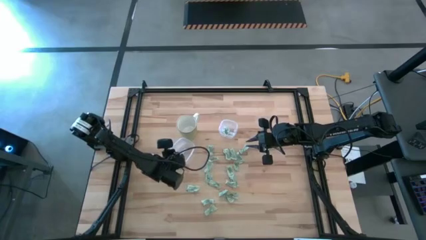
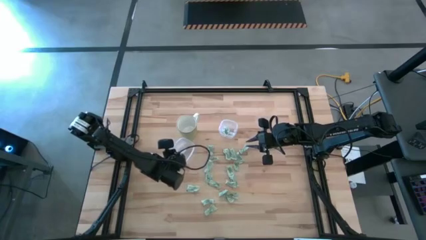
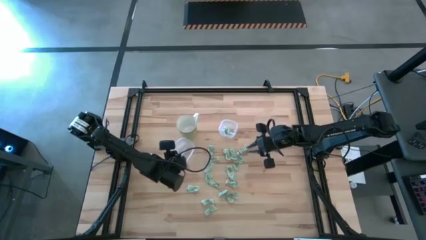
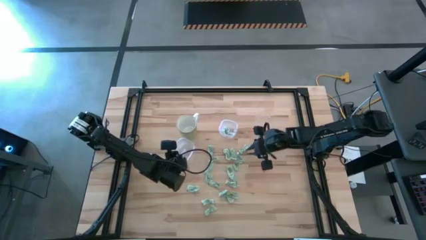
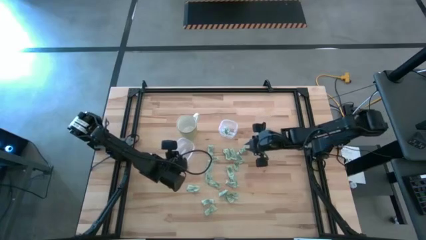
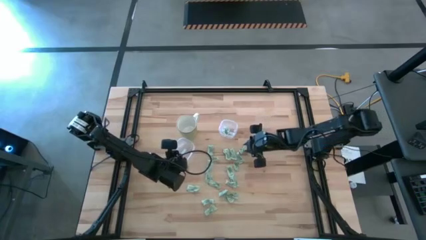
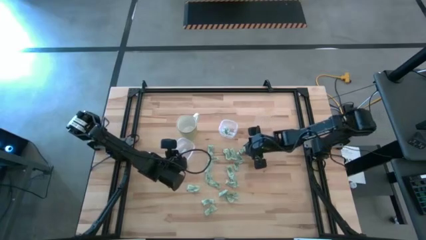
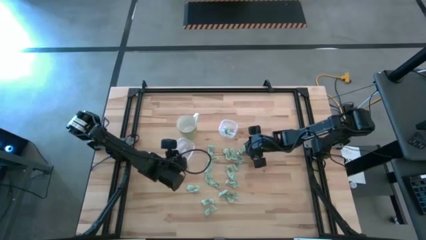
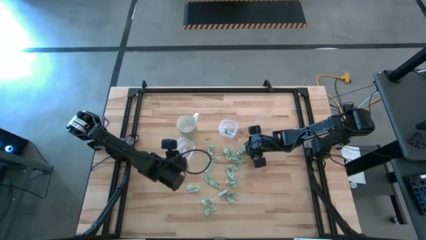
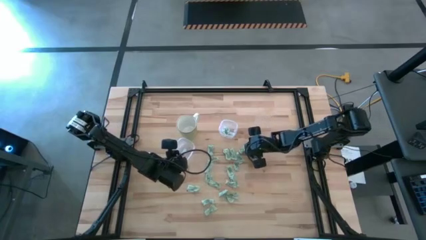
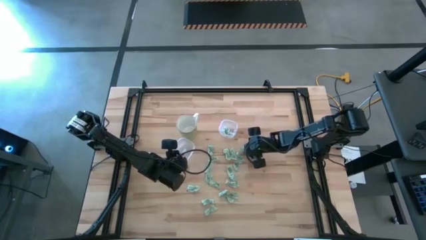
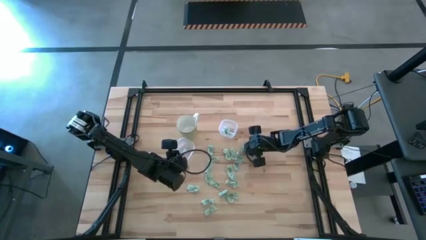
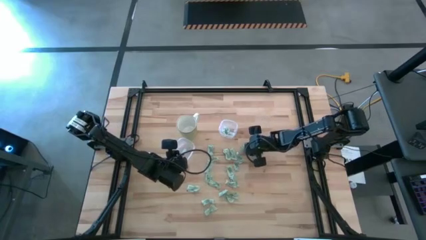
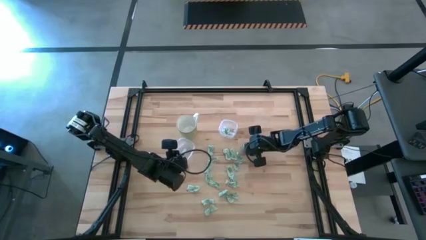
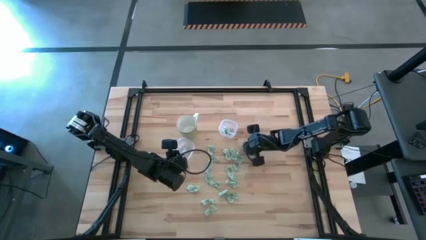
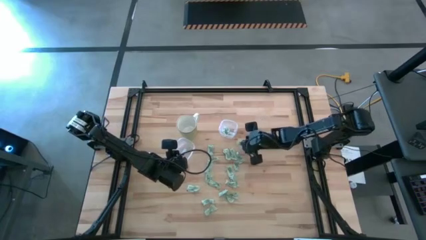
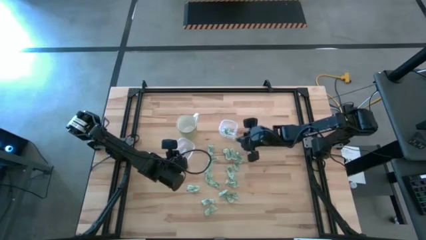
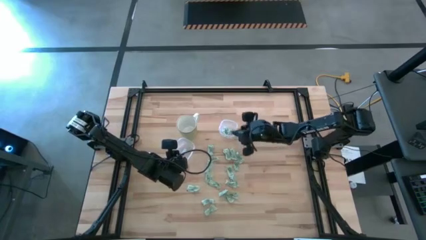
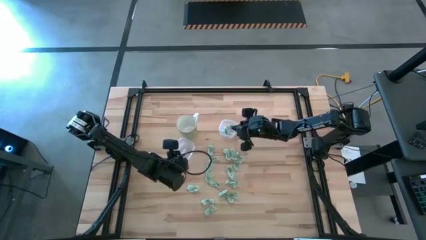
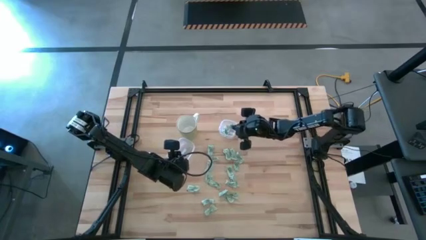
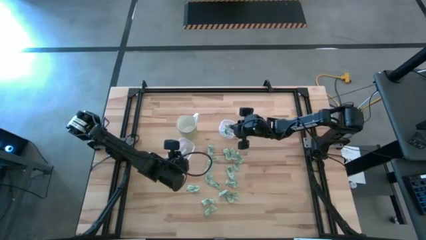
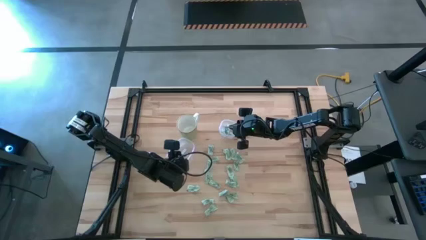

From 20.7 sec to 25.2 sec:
Task: Pick and place items into bin
Put the stevia packet into the top transparent bin

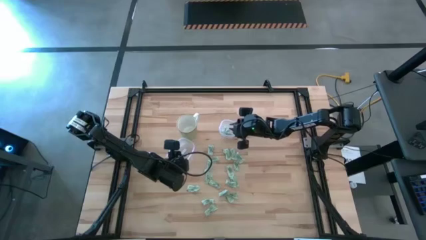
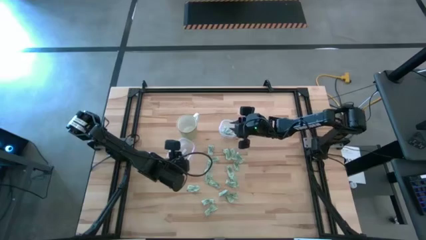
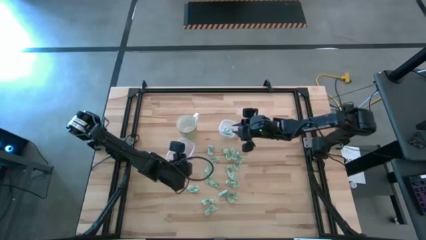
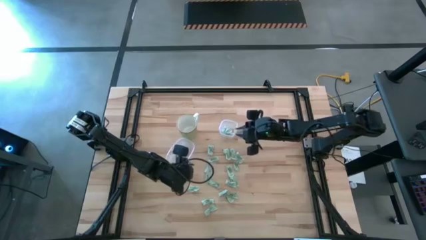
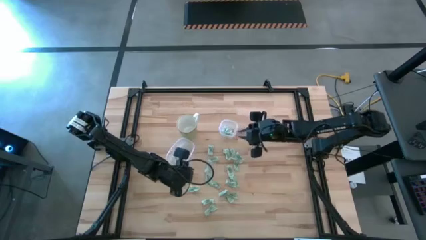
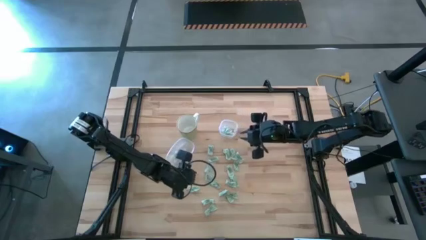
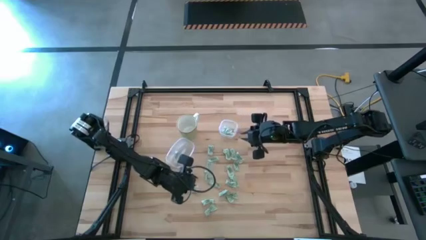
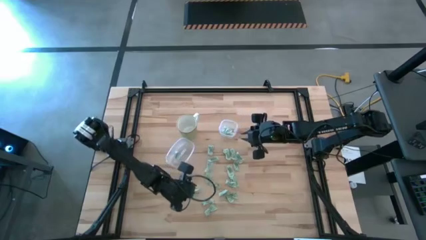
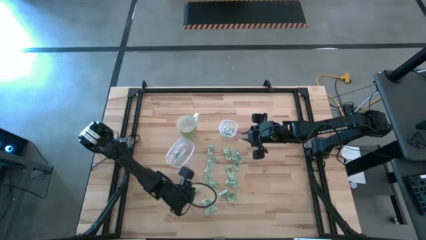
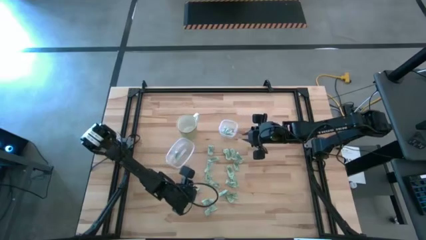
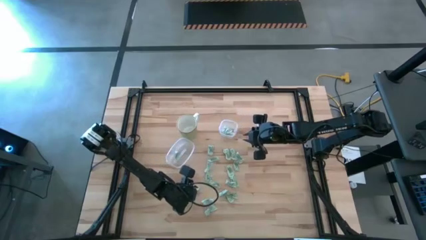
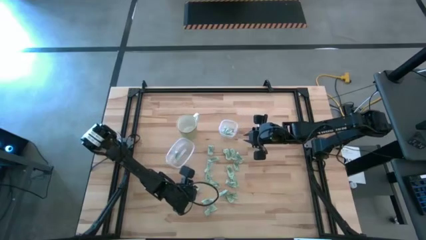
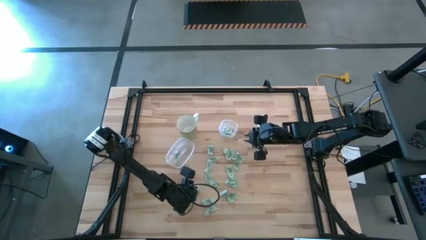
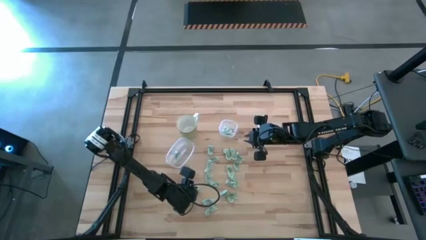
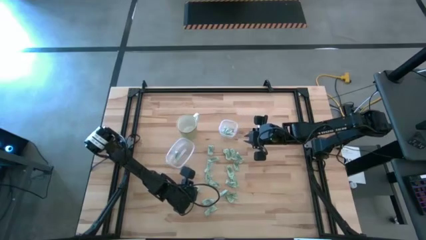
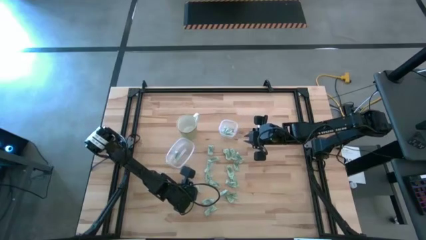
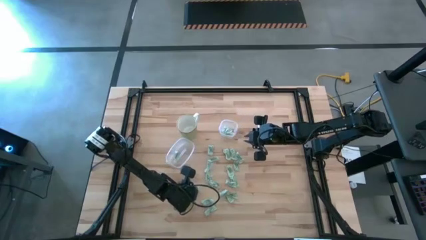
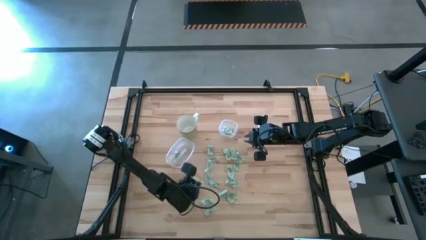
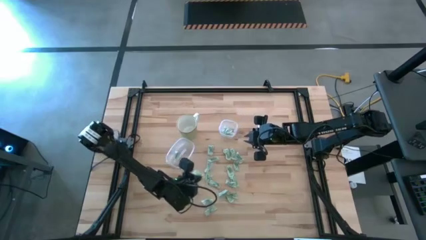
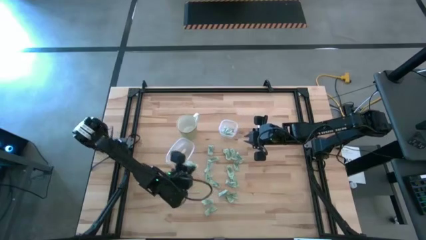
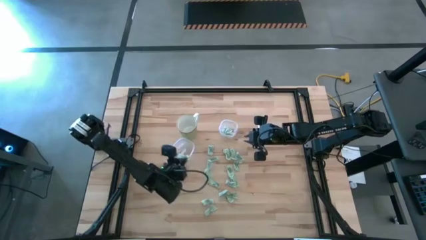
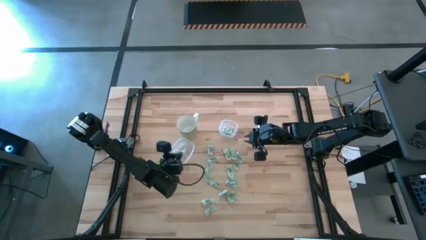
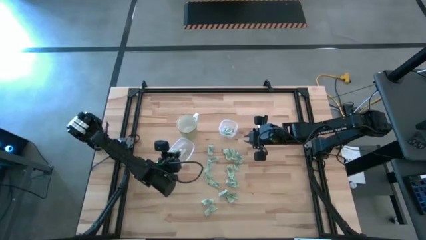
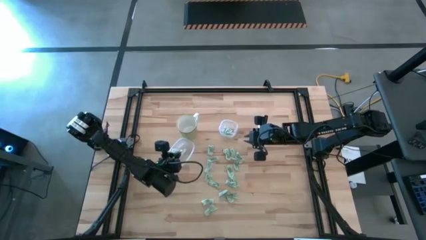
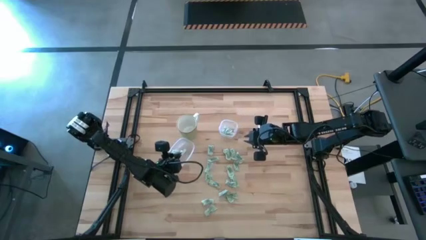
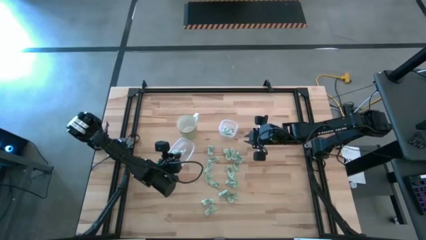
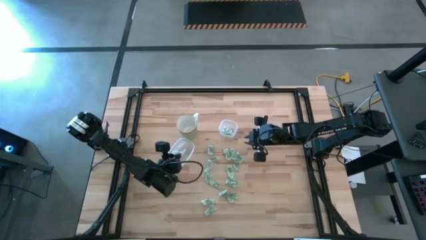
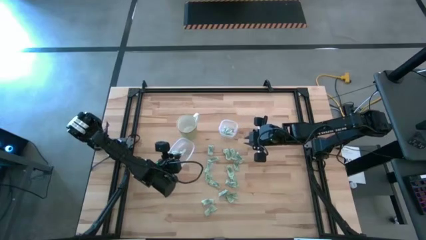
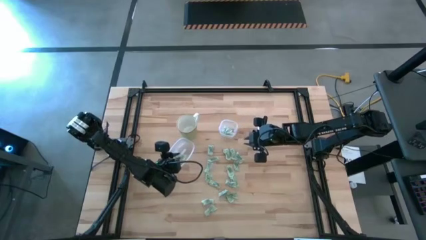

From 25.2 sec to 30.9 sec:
Put the stevia packet into the bottom transparent bin

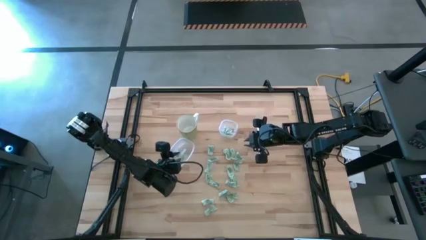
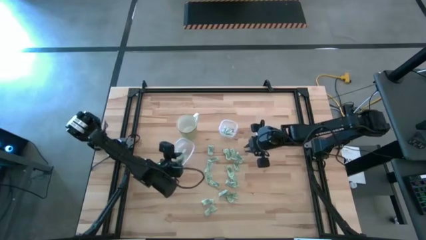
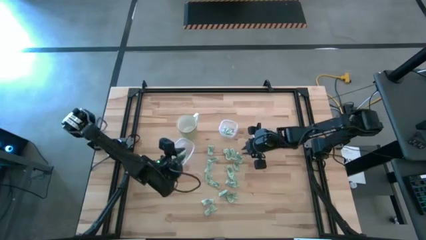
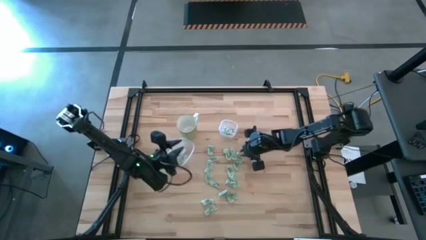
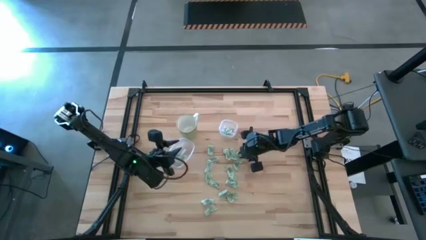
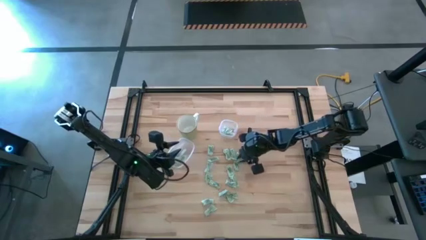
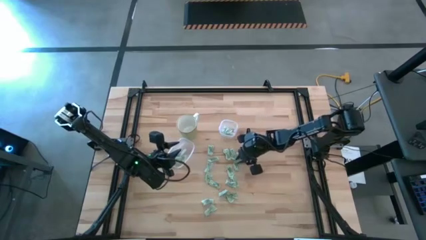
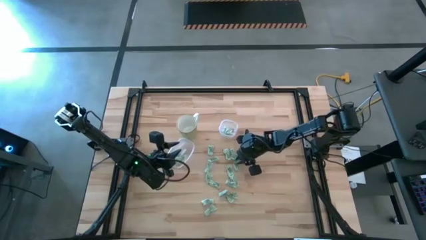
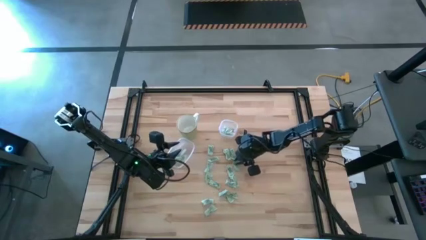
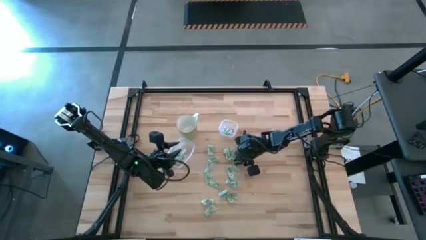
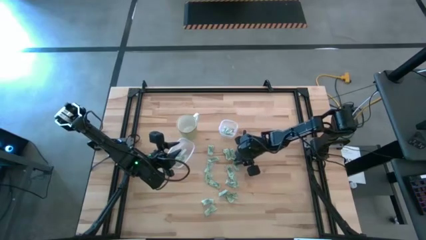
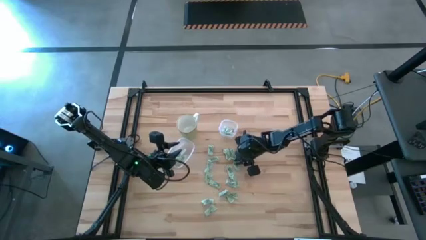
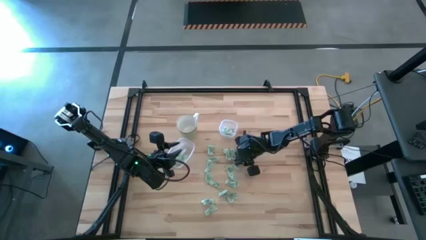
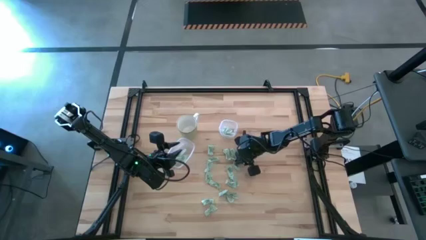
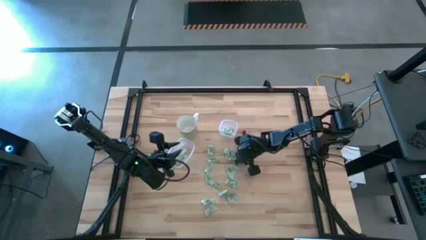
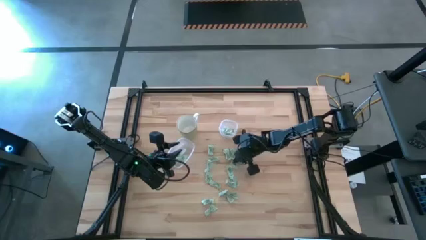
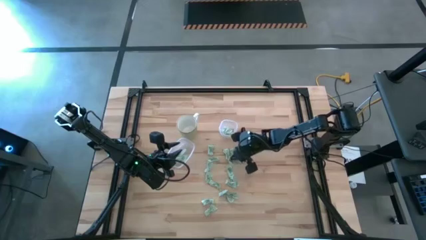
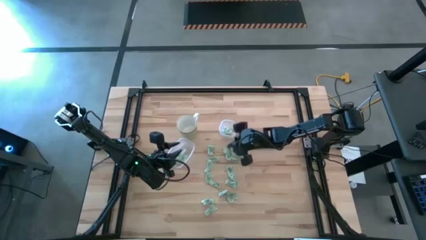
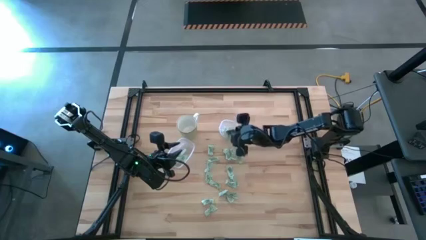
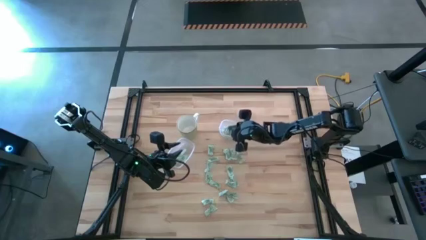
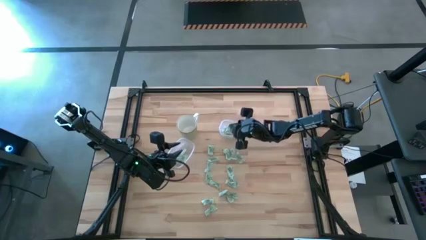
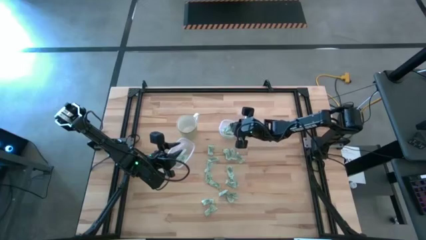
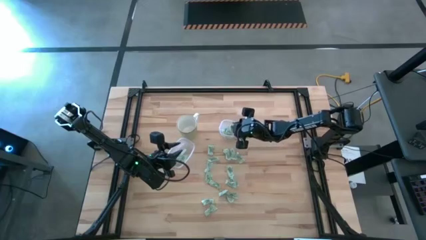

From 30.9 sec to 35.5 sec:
Put the stevia packet into the top transparent bin

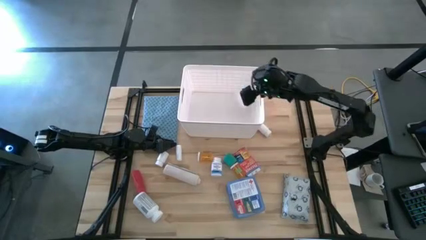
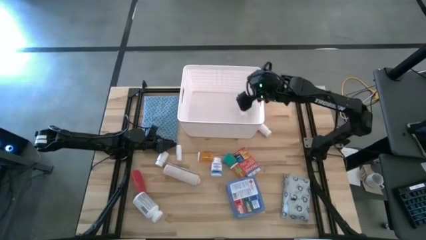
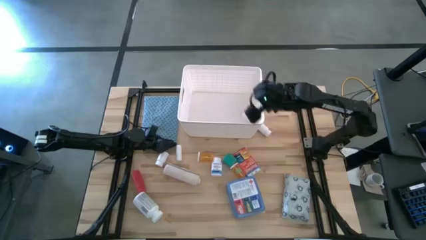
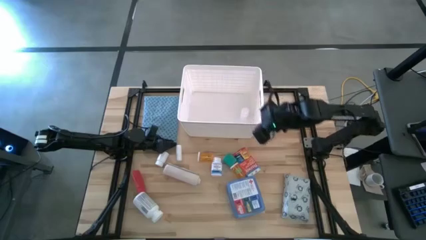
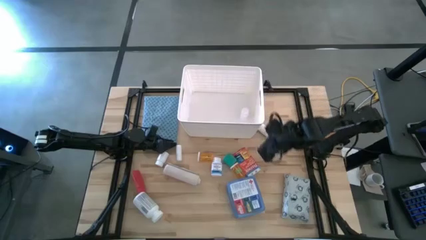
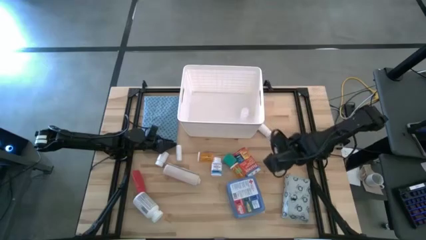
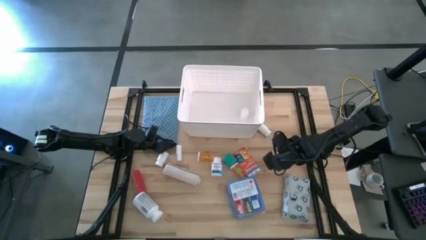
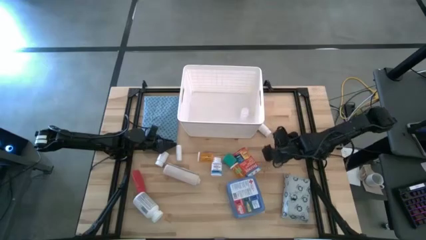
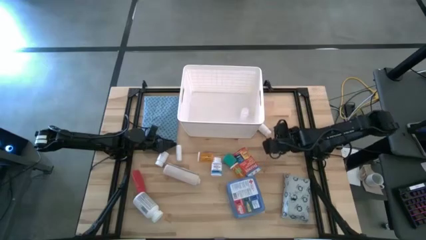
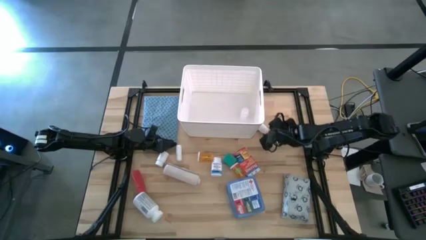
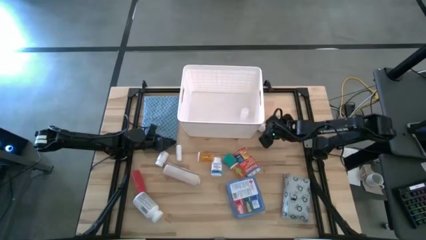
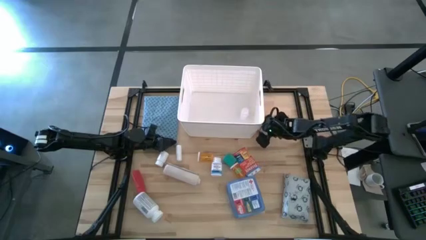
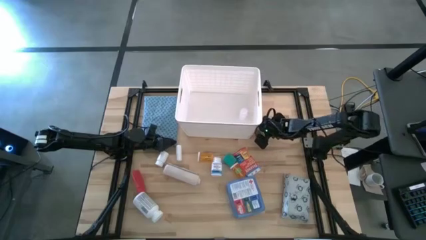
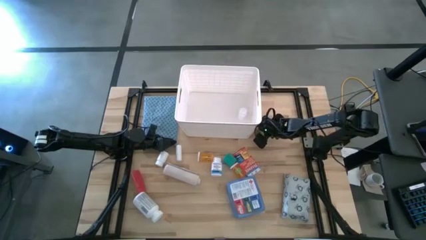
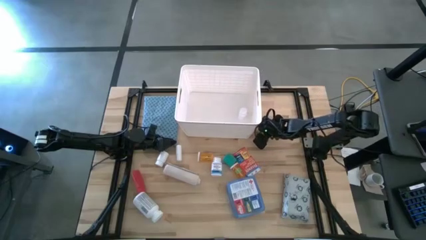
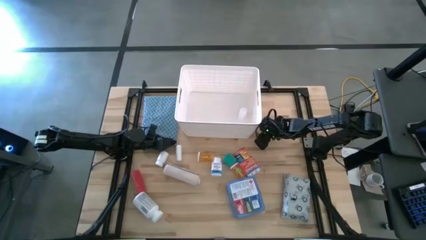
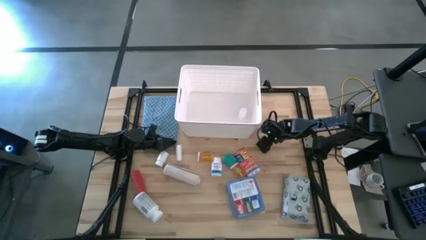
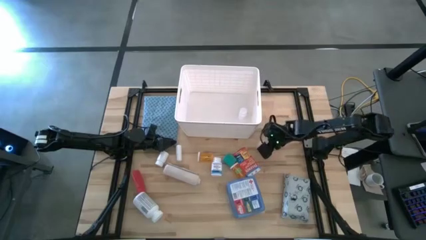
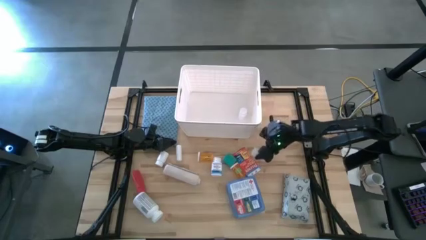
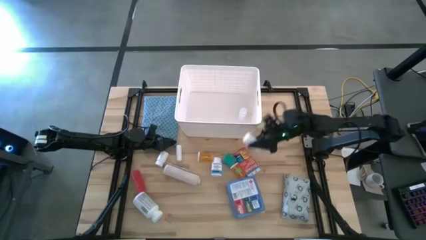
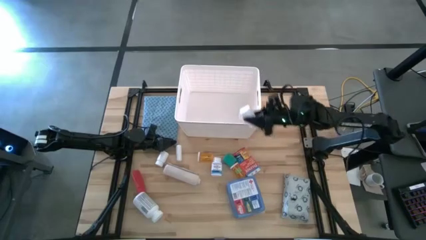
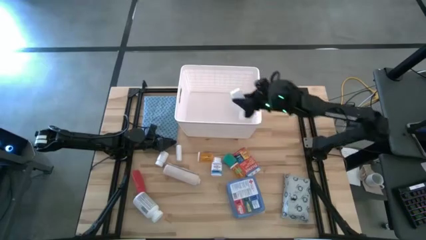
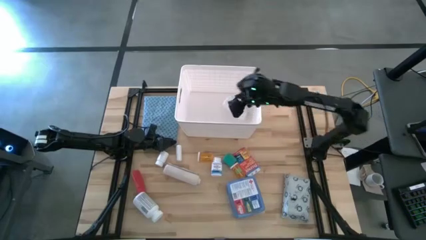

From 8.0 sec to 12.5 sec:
Task: Pick & place medical supplies in basket/bin
Put the right white medicine bottle into the white bin
